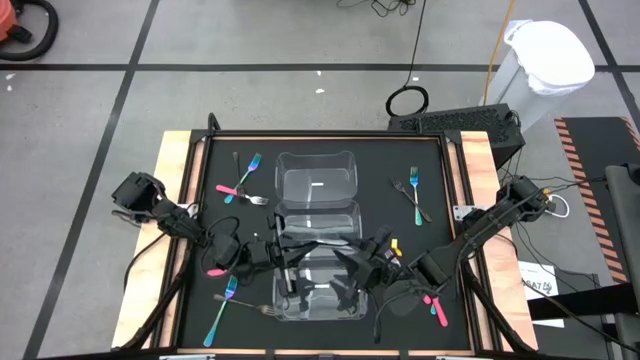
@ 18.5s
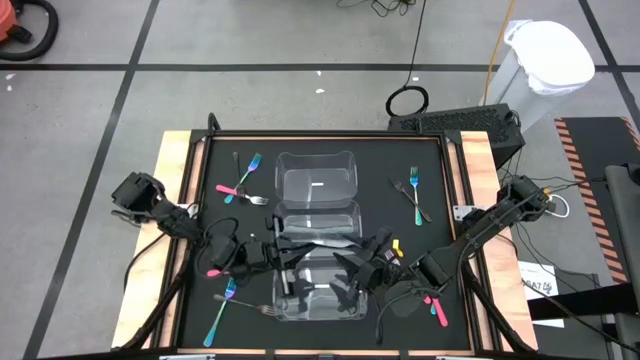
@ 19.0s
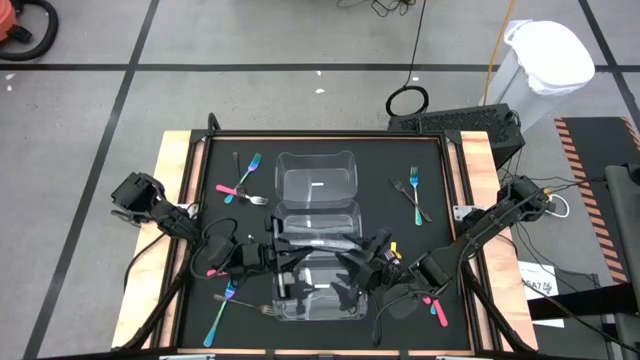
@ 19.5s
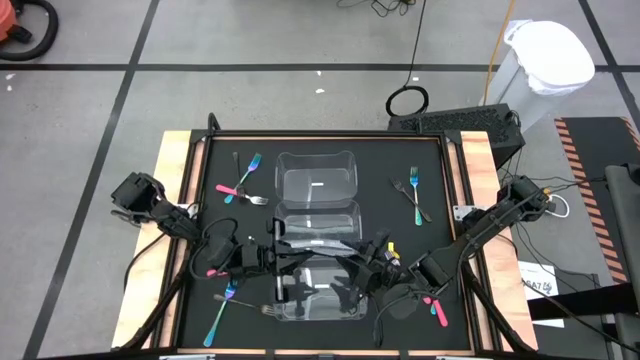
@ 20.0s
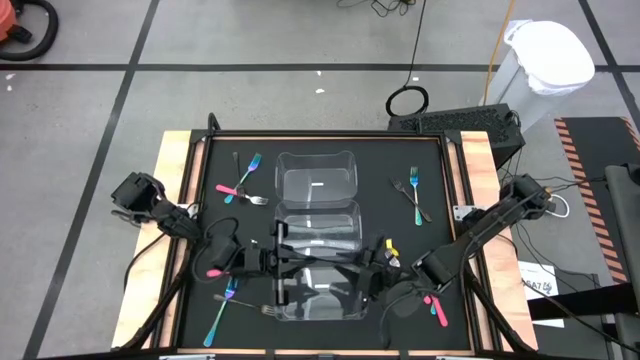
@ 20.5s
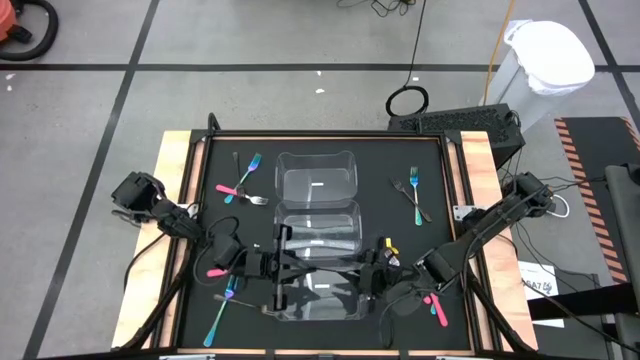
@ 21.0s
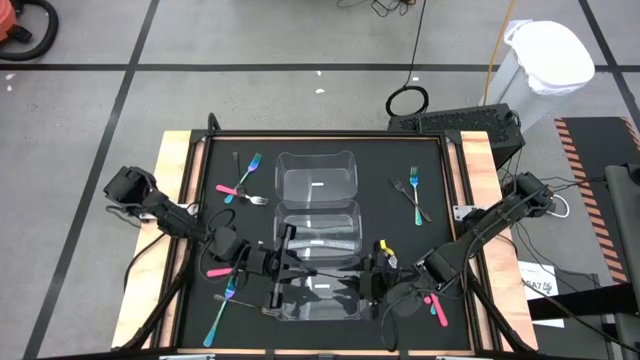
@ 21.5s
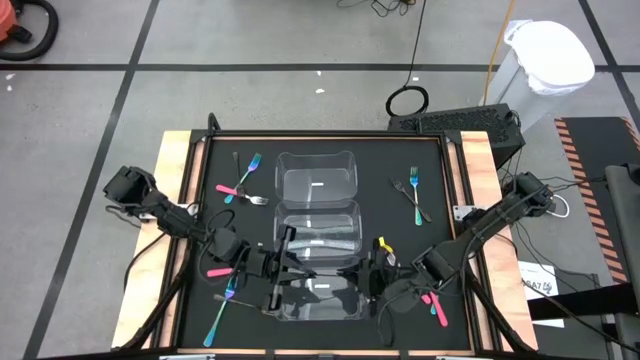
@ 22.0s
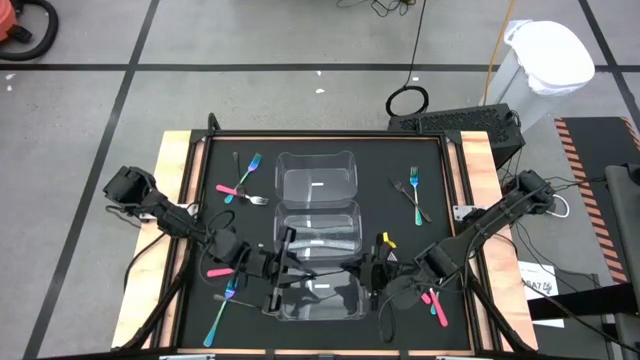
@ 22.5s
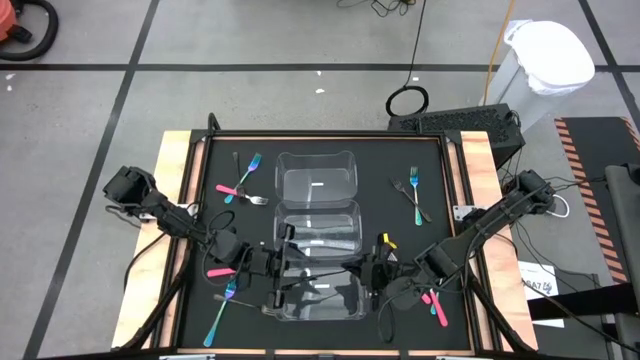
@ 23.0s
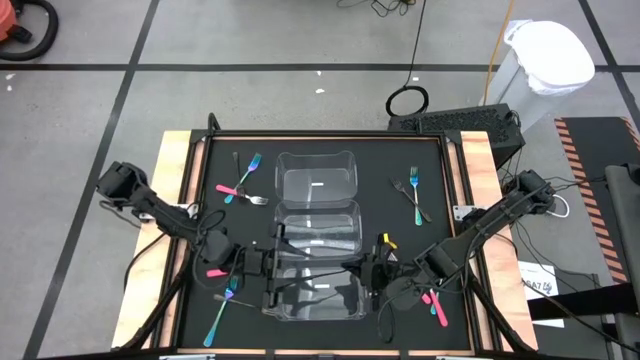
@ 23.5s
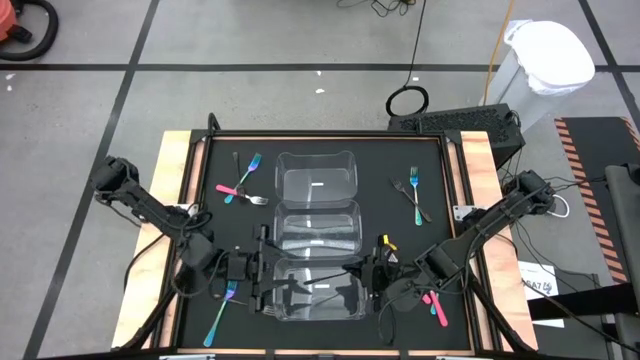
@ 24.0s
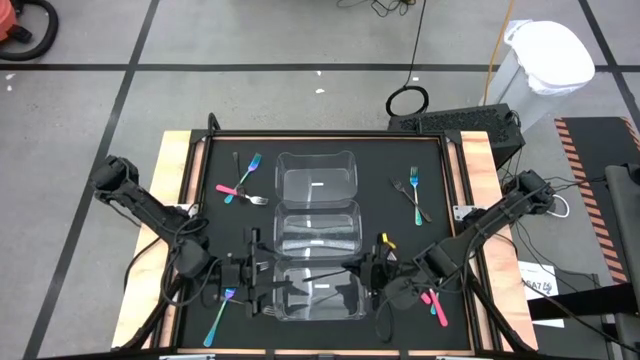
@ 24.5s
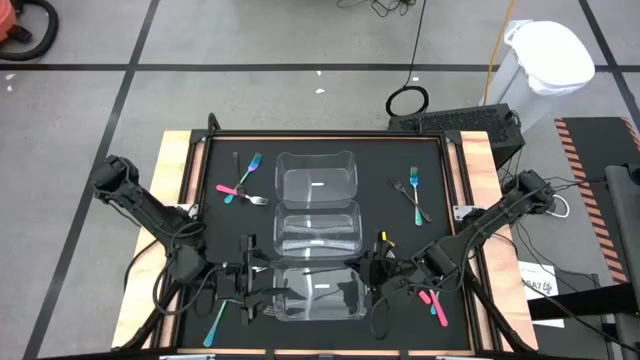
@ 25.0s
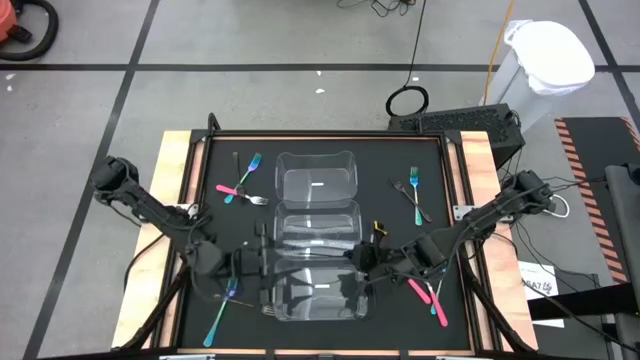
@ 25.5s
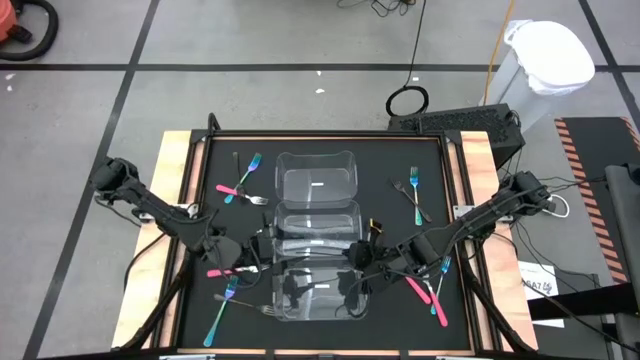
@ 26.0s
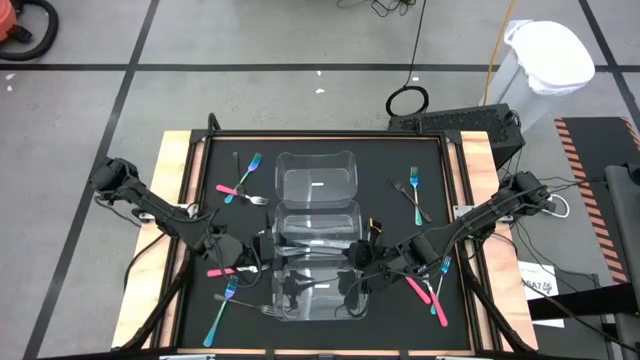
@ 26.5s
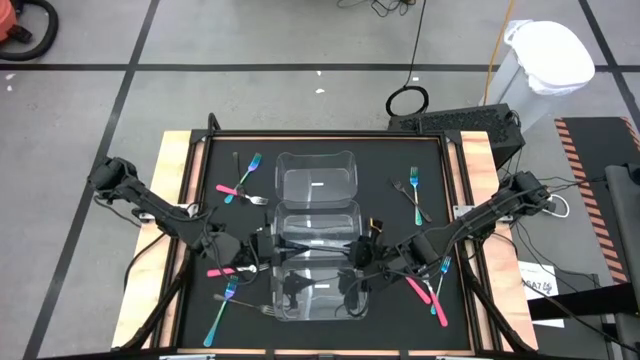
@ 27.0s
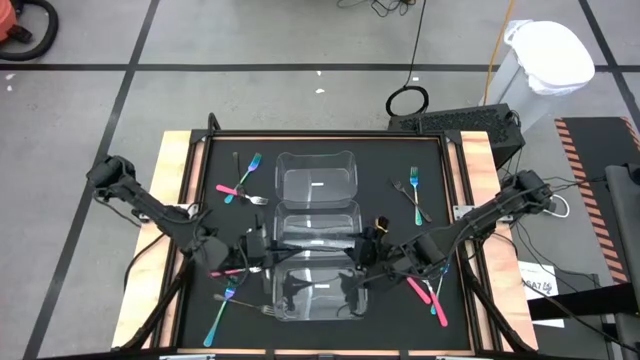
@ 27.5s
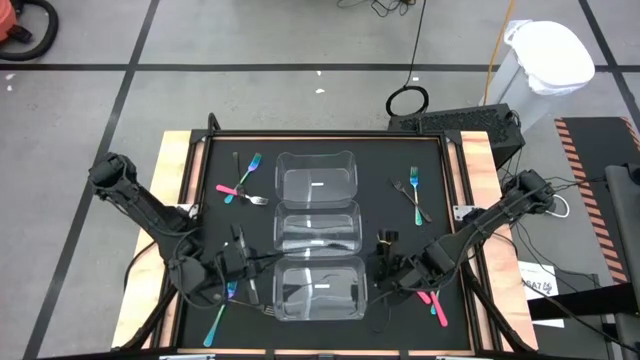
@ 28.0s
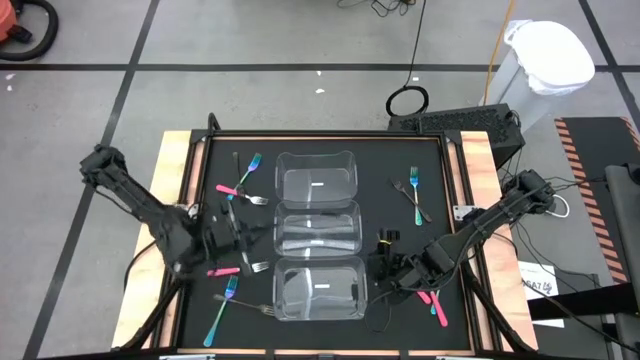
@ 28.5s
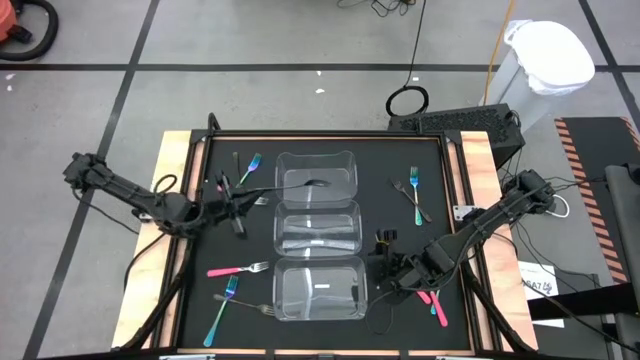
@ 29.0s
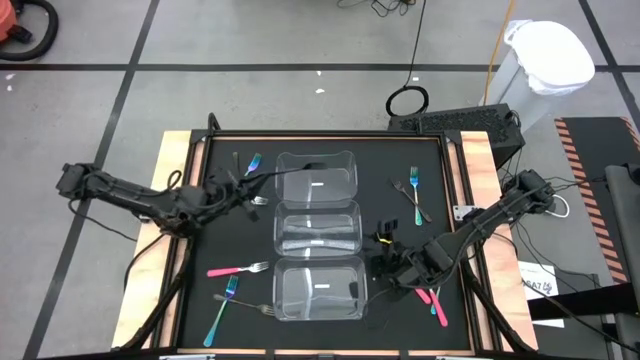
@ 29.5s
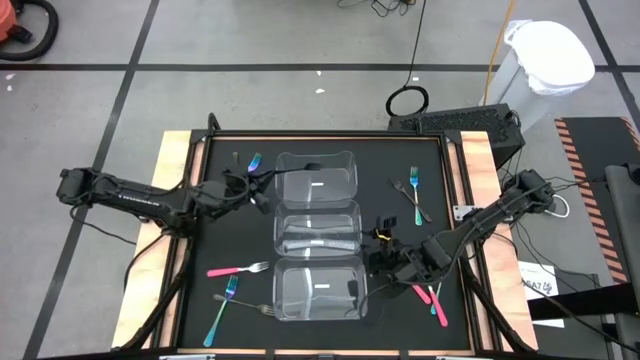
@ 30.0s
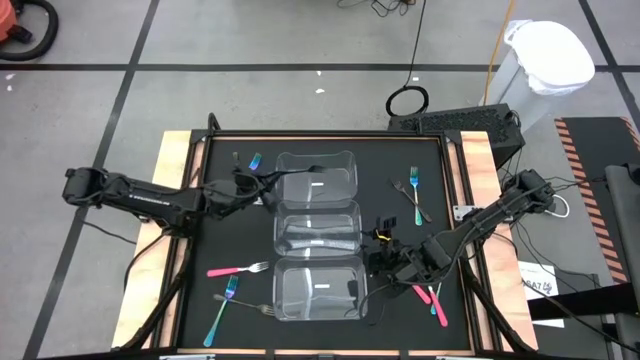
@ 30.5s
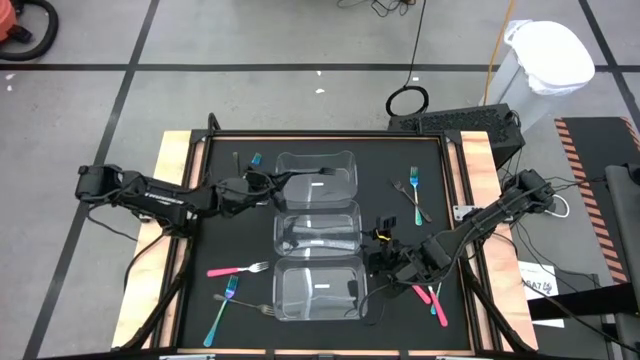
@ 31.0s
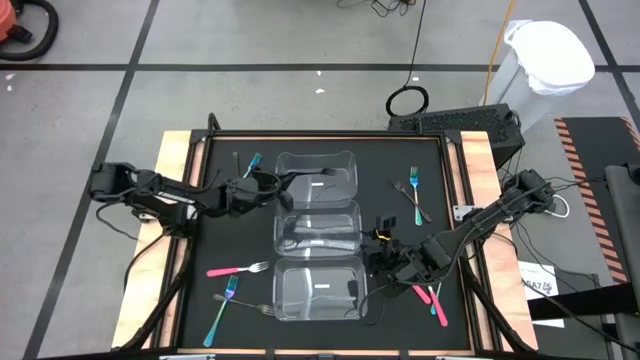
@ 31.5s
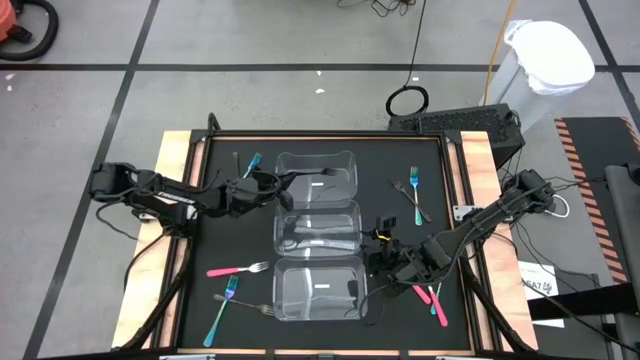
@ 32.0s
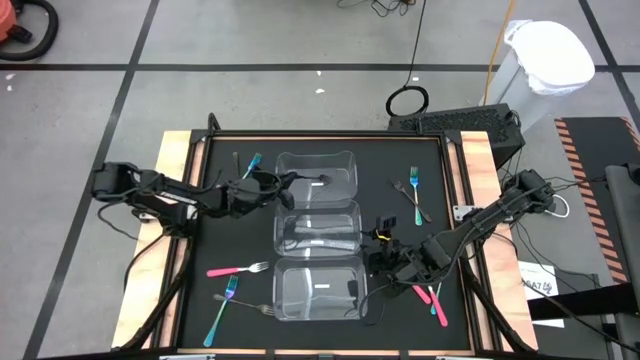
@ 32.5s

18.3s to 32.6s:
Task: Sort silverware by color (type)
Put the middle black fork into the top transparent bin

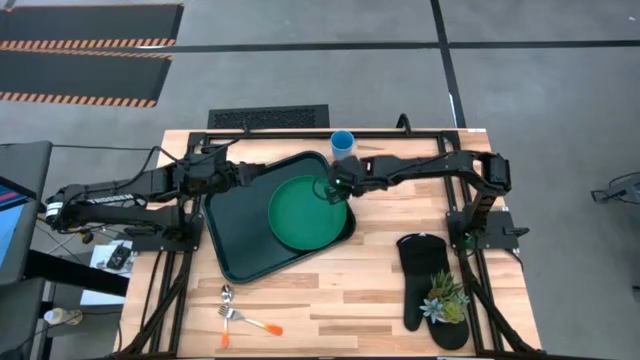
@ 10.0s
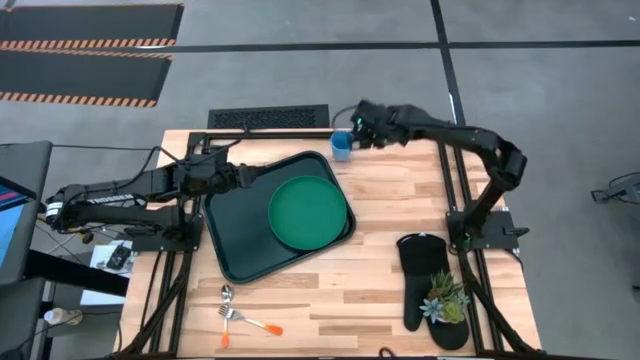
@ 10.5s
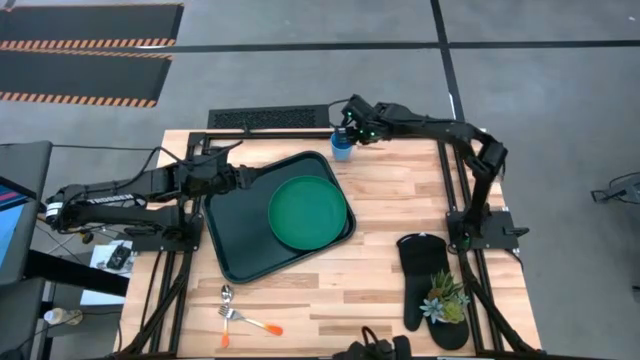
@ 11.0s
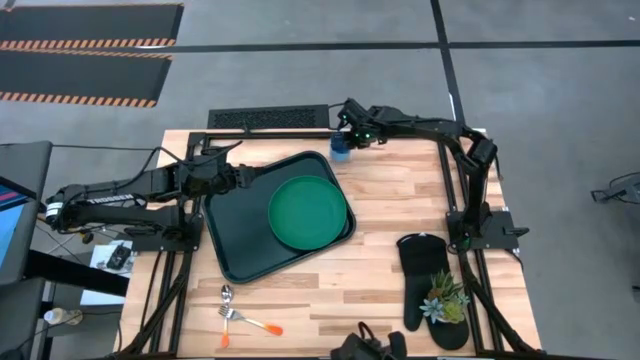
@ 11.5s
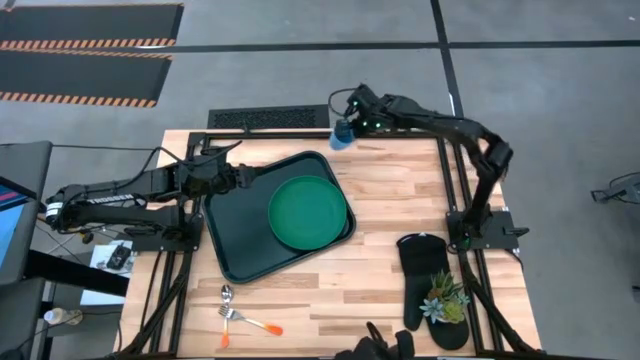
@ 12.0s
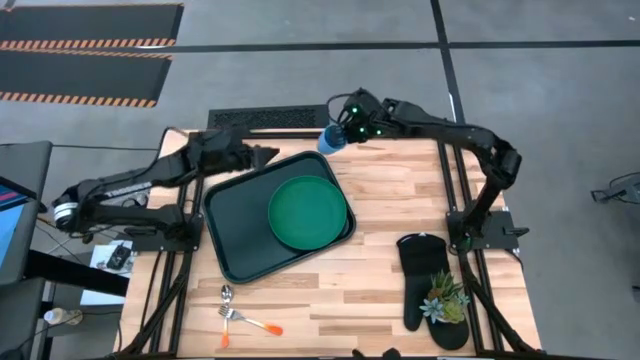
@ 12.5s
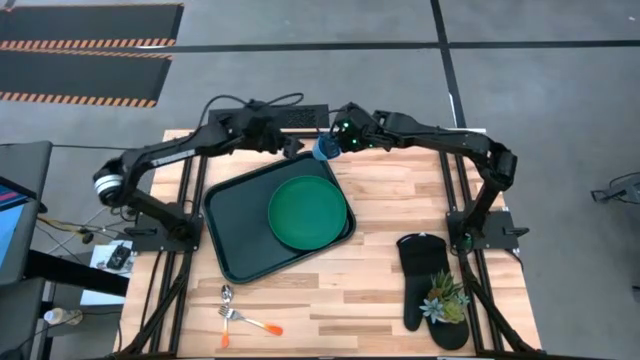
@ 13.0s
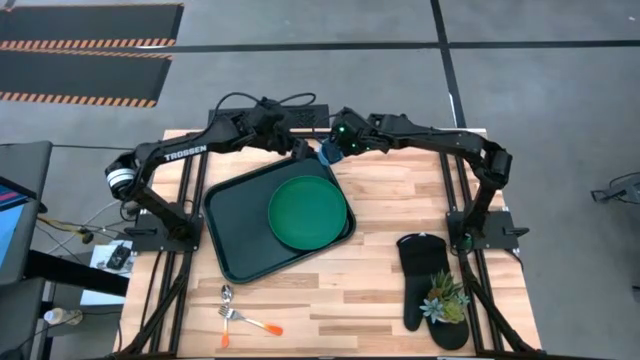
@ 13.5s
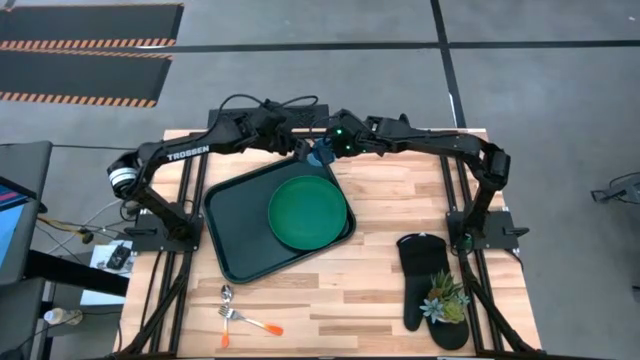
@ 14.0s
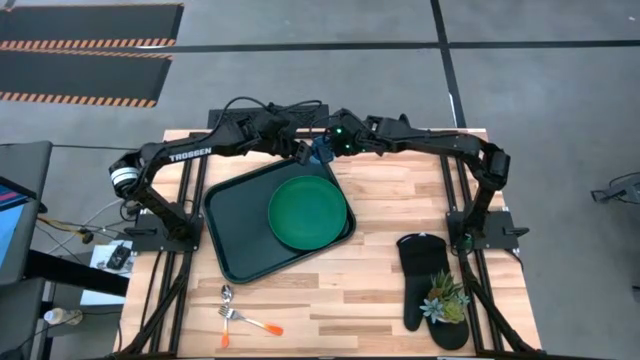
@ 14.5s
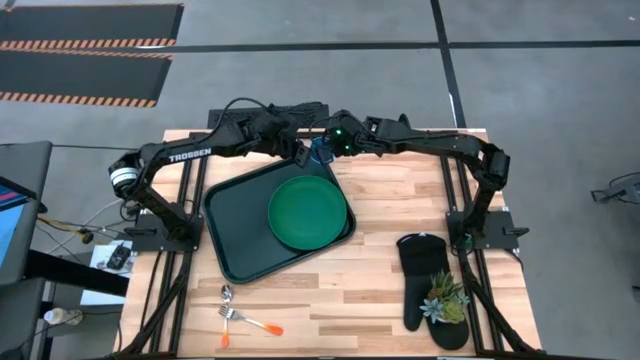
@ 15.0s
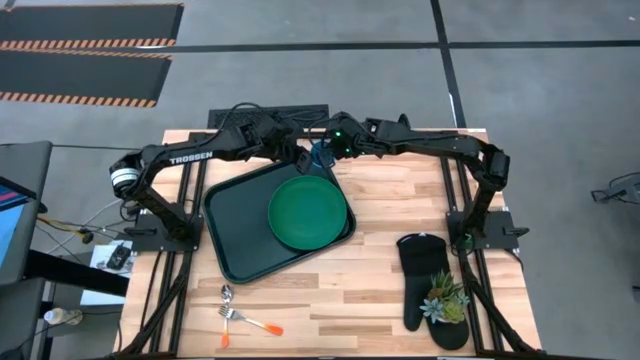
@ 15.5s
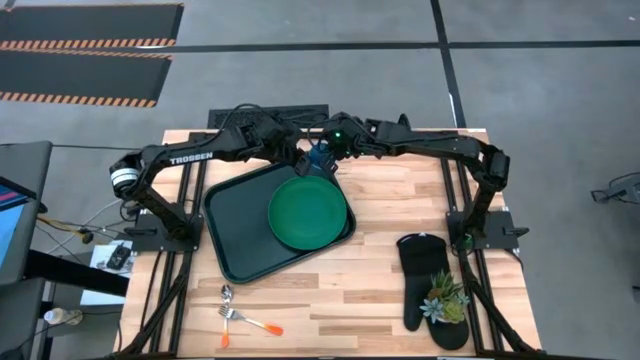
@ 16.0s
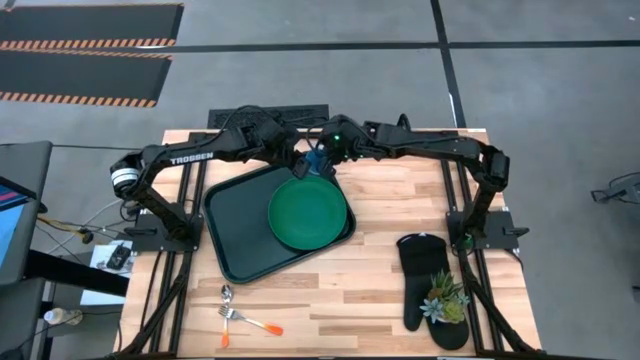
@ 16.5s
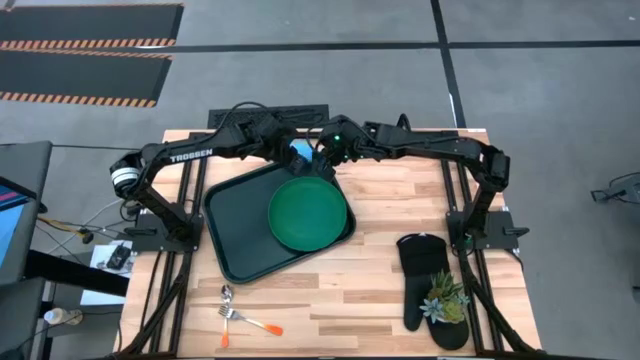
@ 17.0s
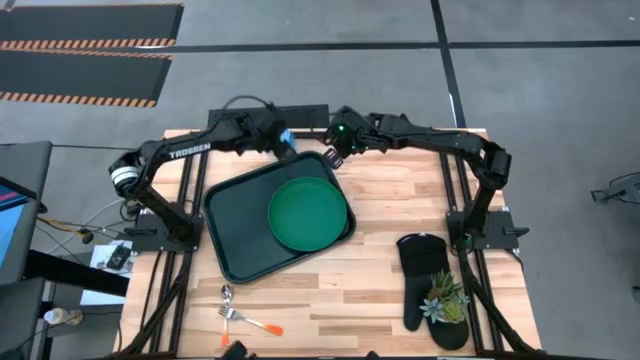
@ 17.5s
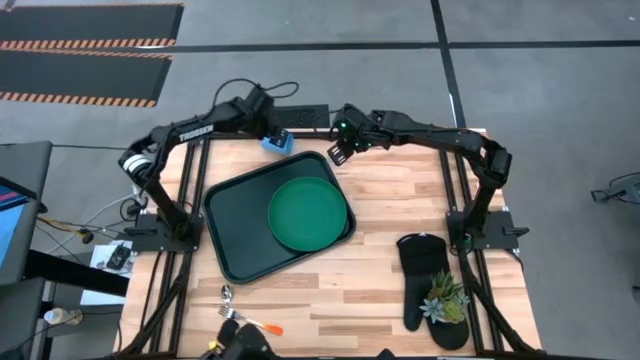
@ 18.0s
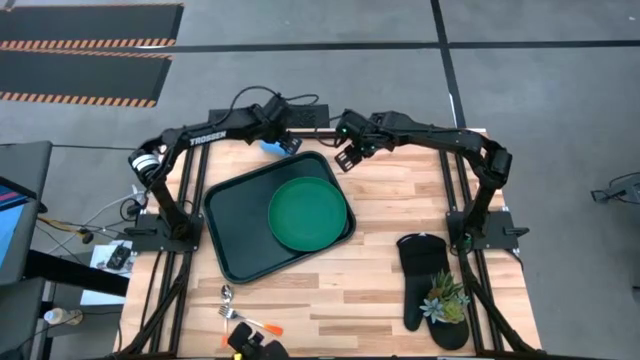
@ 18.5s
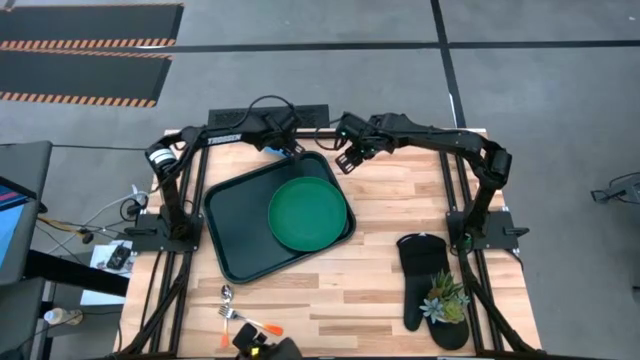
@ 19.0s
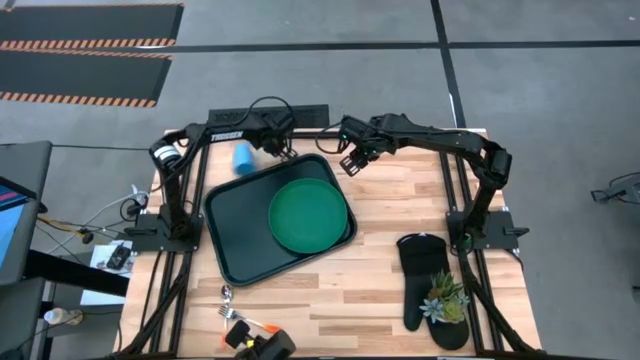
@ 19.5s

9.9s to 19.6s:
Task: Pick and place plate/cup/fork/spoon on tray
Put the blue cup on the top right of the black tray
